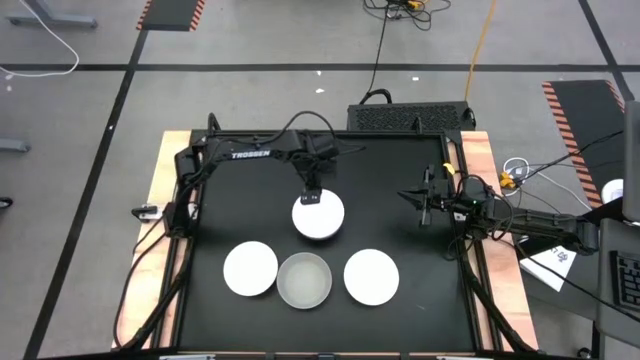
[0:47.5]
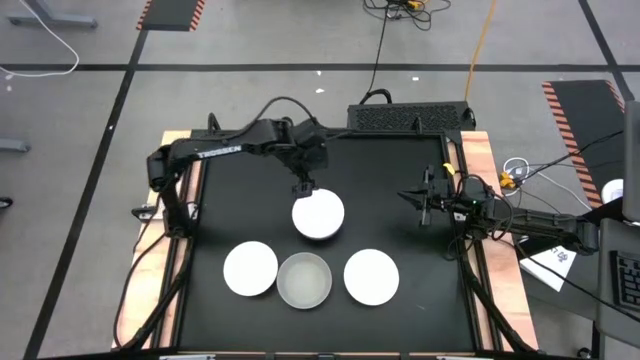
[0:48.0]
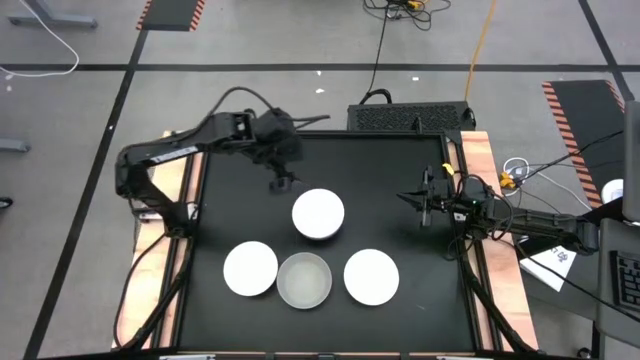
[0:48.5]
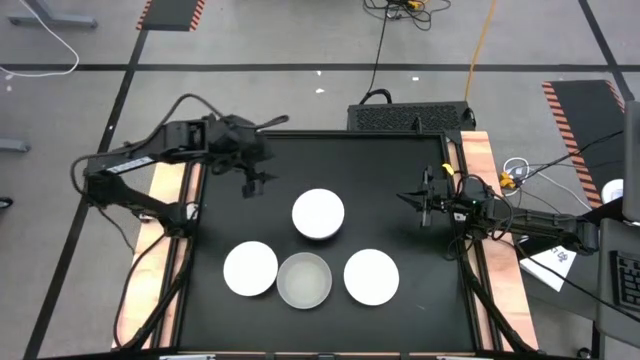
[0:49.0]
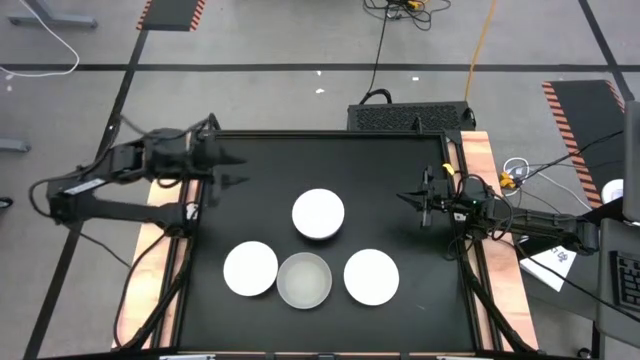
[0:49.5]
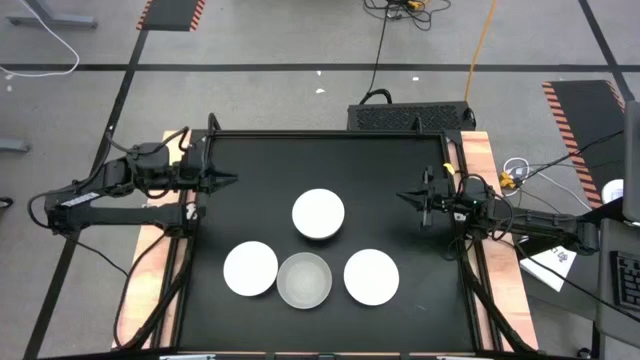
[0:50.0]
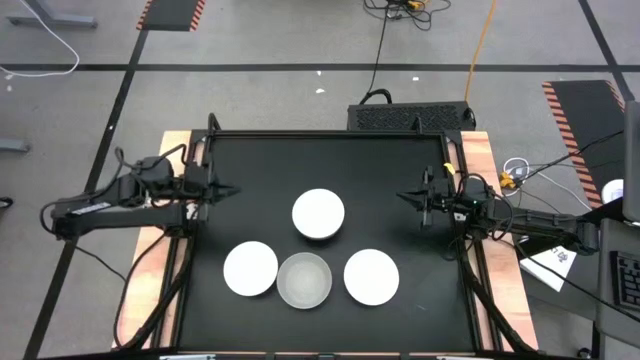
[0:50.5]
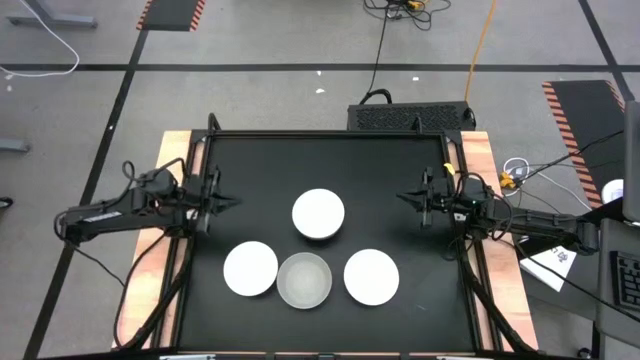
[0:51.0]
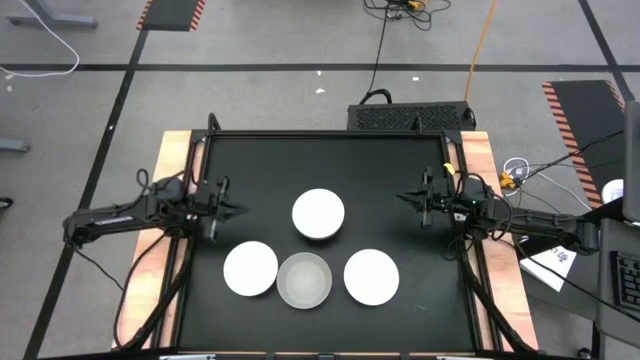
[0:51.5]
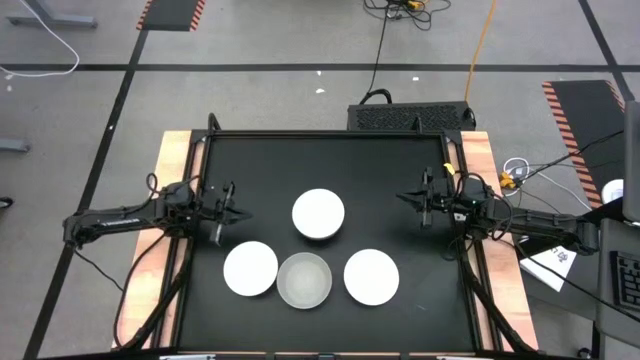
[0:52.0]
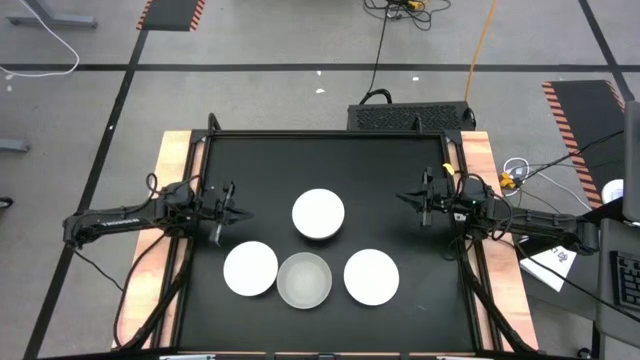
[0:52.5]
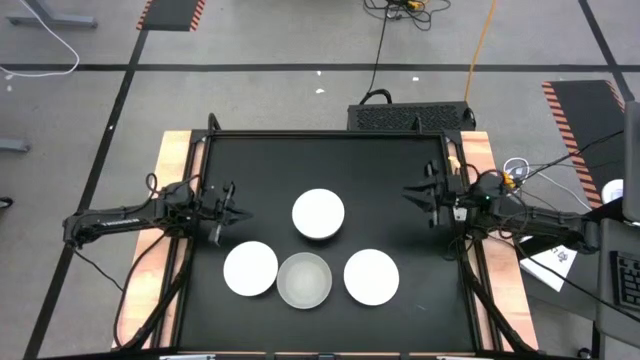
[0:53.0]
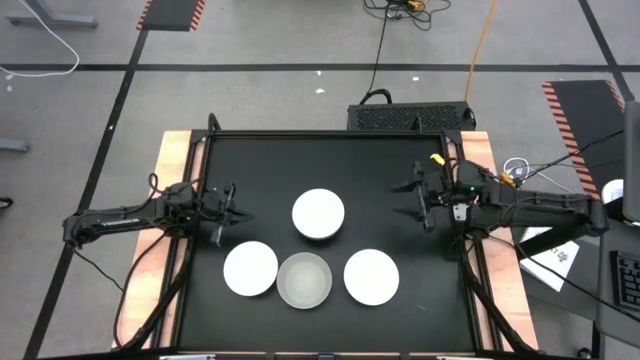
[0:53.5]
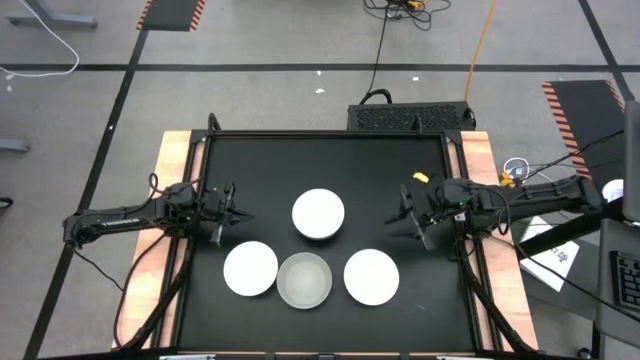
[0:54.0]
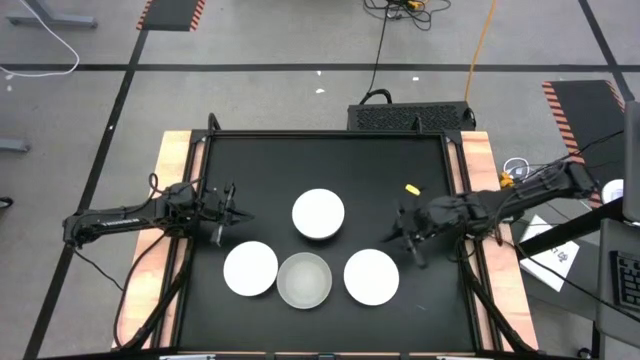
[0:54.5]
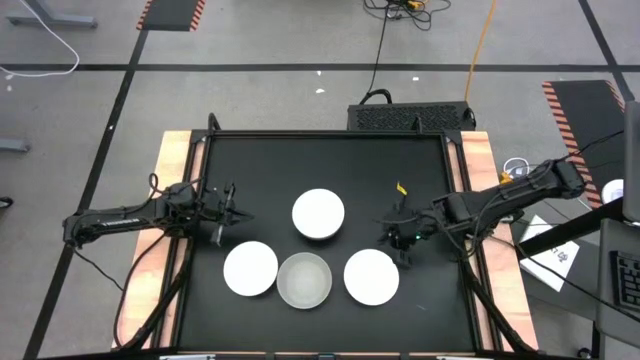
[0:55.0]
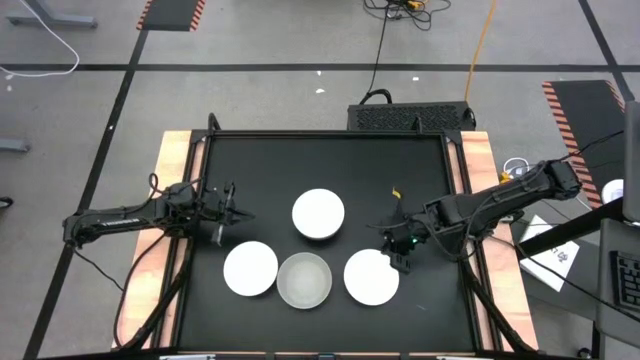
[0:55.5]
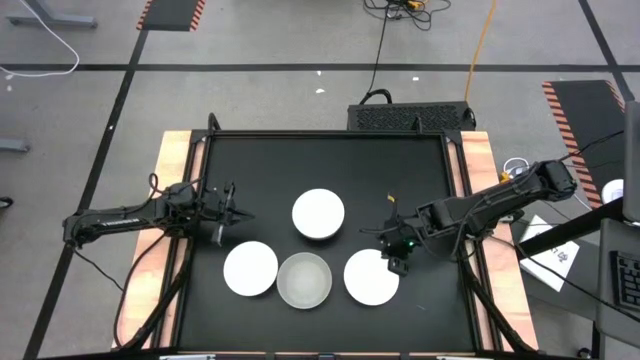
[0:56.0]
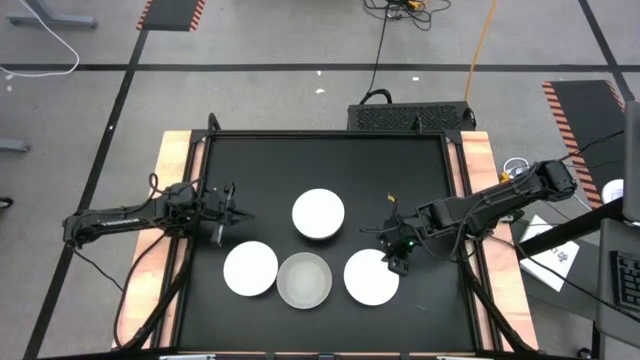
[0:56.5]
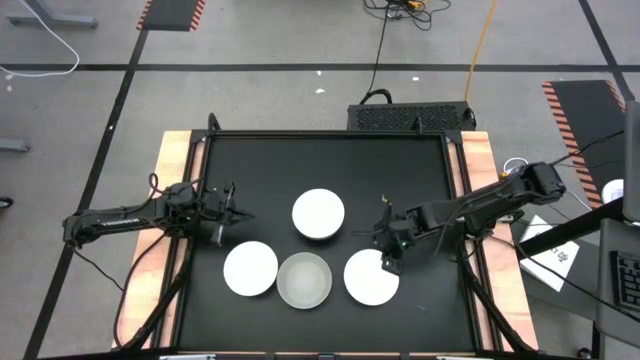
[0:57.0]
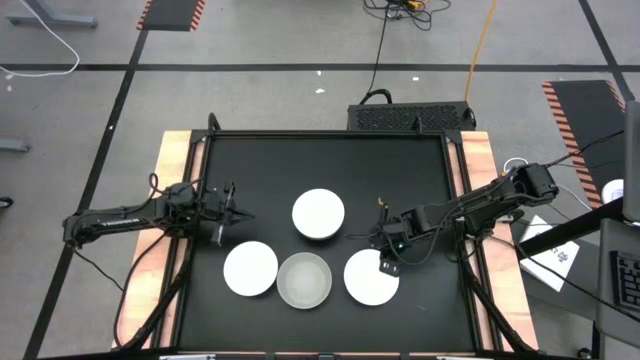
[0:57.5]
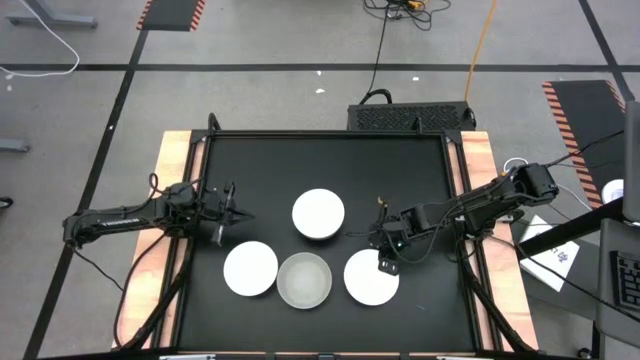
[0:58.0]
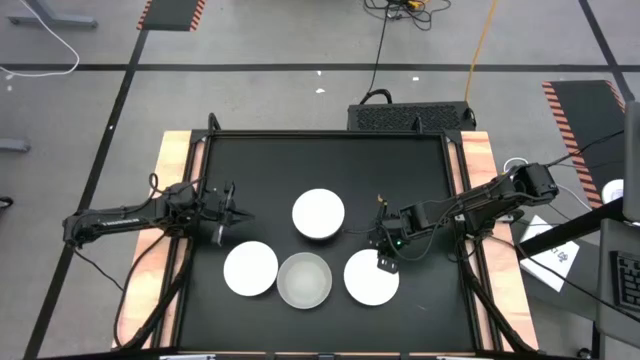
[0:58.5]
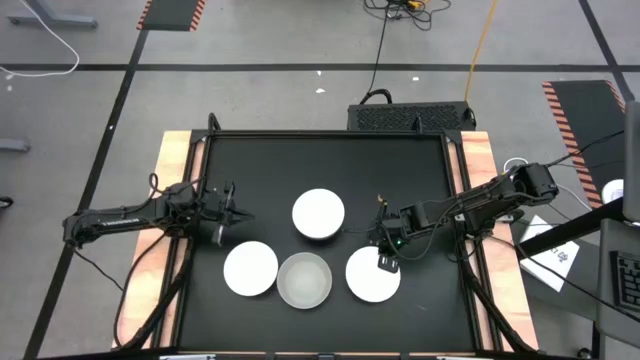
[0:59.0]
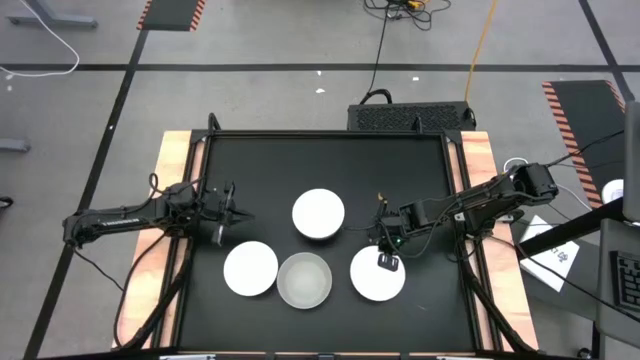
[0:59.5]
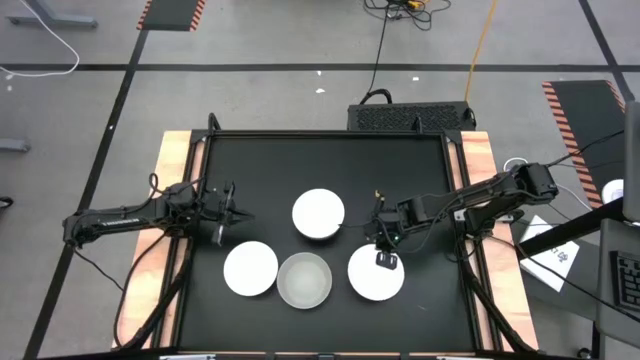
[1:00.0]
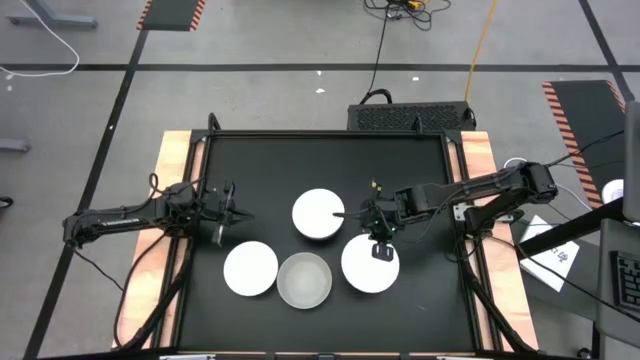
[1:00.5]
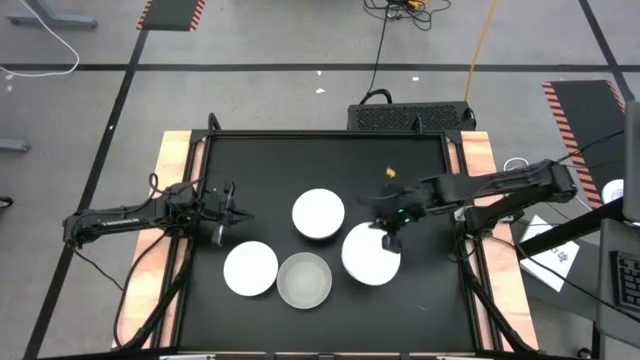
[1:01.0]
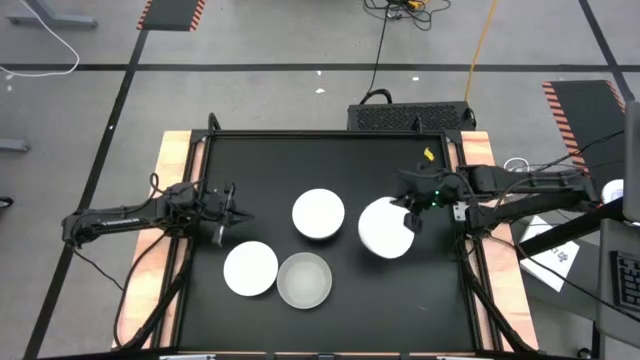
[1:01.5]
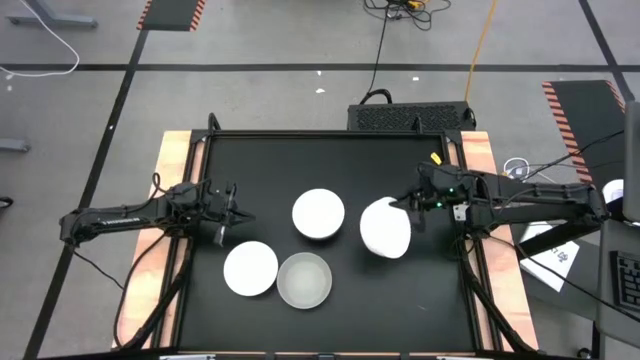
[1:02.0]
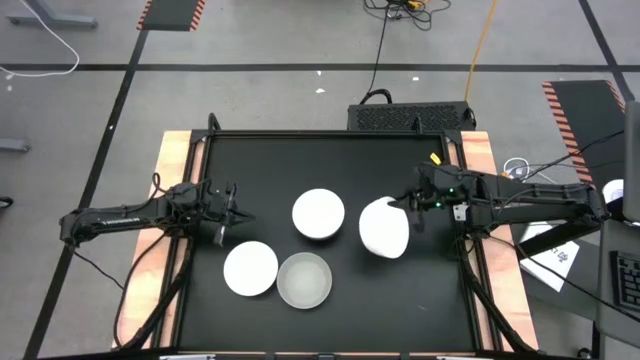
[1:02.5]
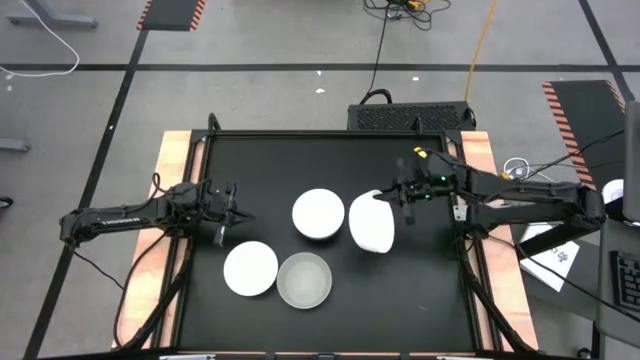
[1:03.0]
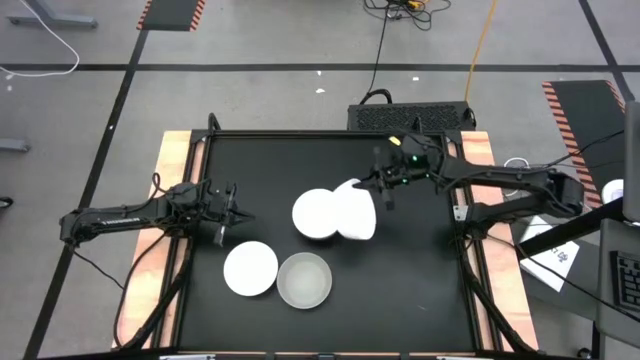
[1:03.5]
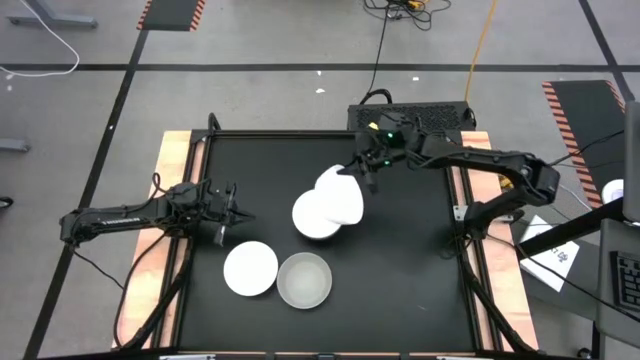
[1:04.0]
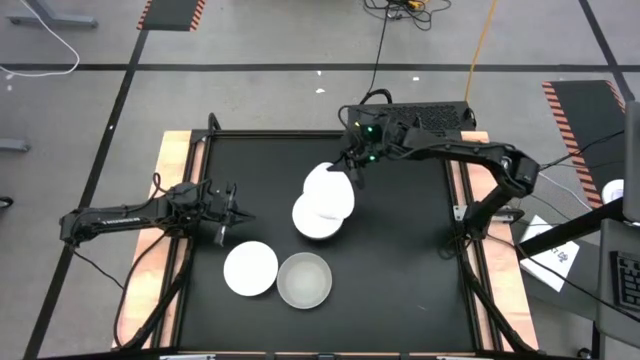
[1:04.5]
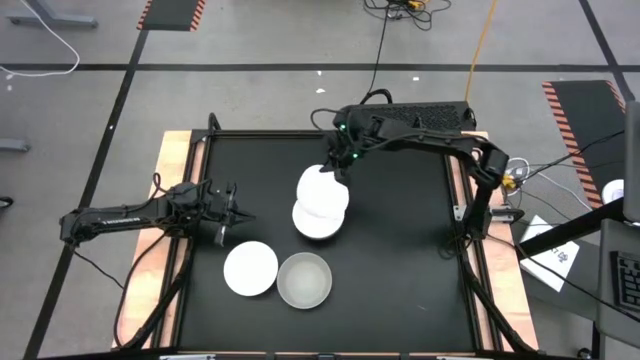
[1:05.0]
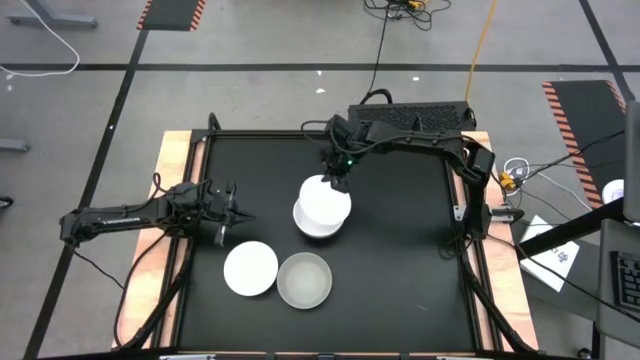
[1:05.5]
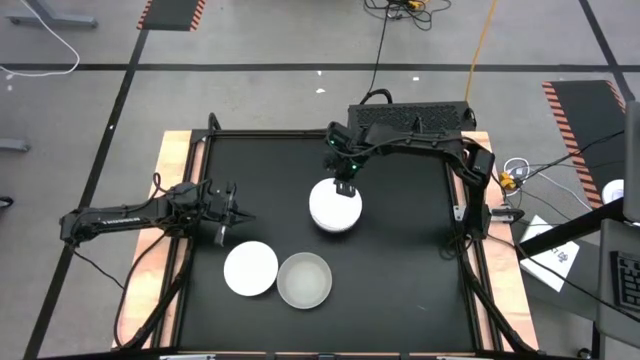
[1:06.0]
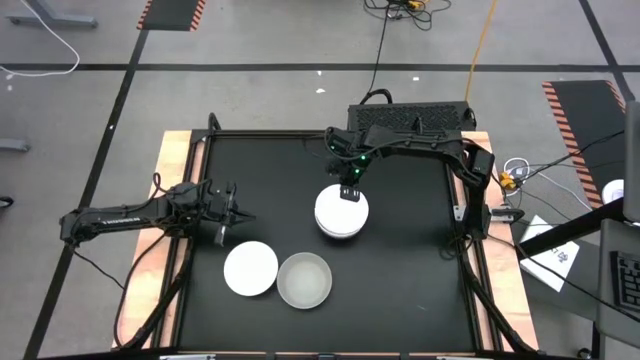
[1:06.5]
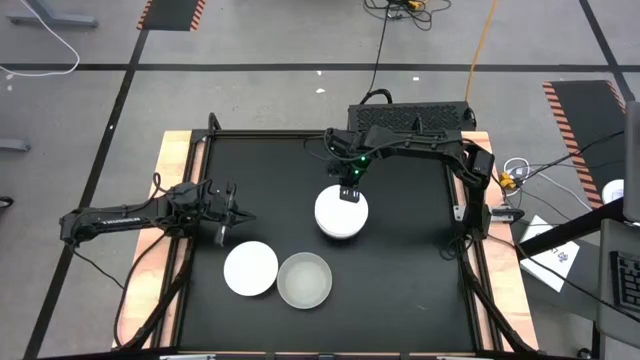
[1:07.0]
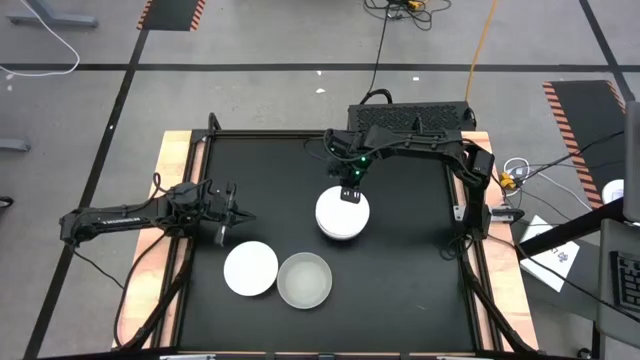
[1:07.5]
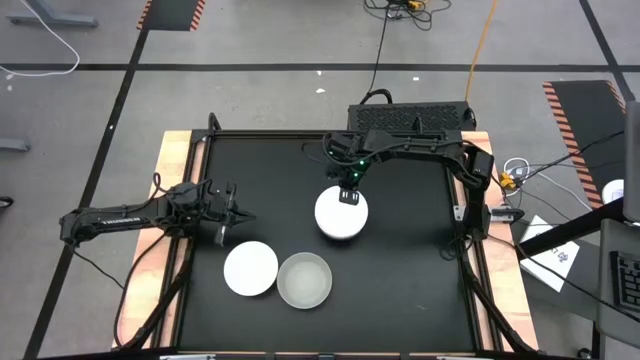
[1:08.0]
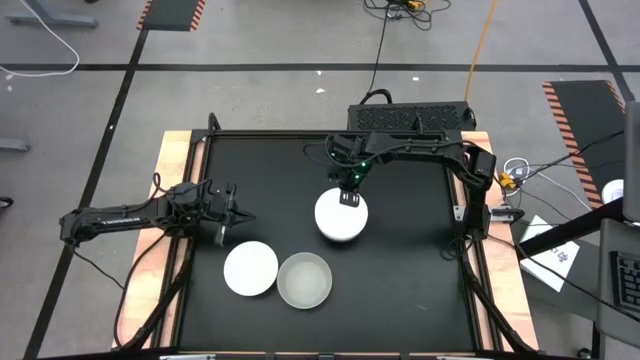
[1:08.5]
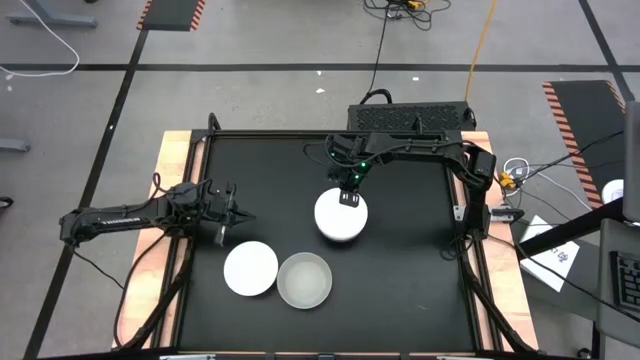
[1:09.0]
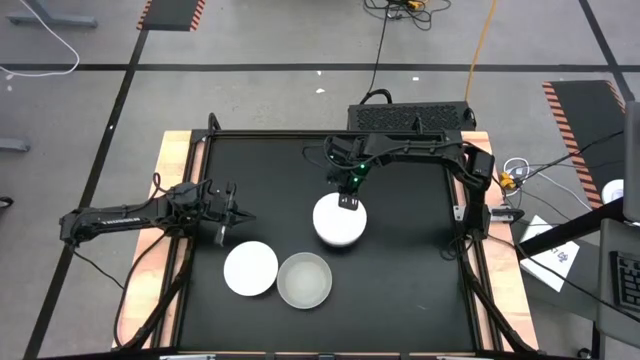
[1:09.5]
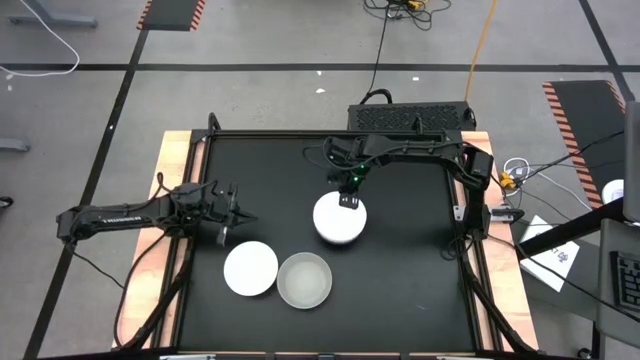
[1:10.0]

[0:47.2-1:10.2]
Task: Nest bowls inside each other
Stack the right white bowl on the white bowl
